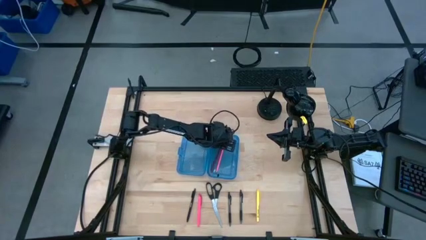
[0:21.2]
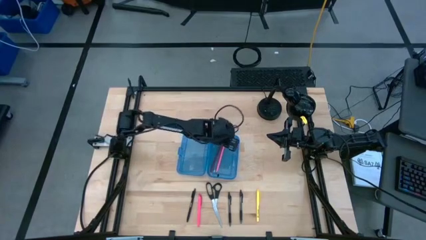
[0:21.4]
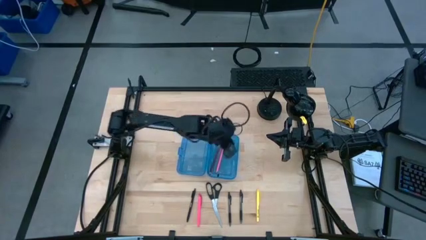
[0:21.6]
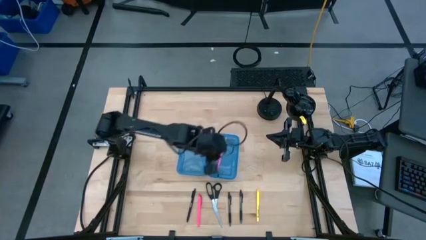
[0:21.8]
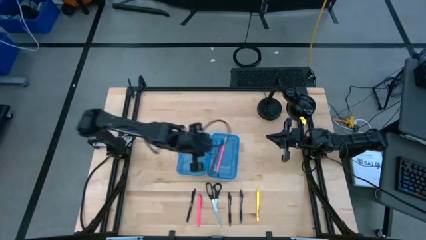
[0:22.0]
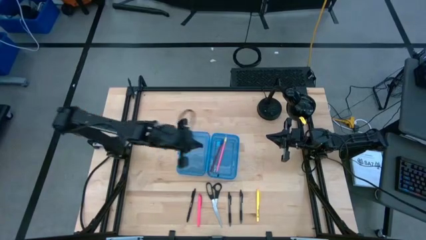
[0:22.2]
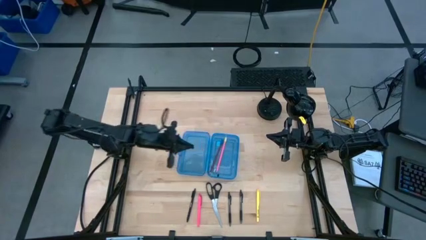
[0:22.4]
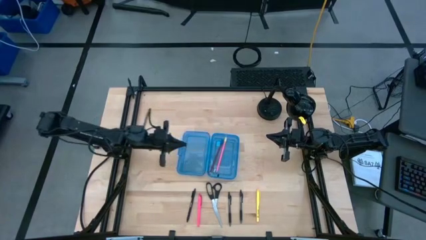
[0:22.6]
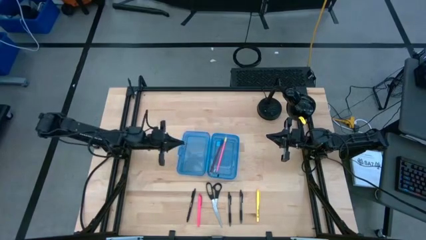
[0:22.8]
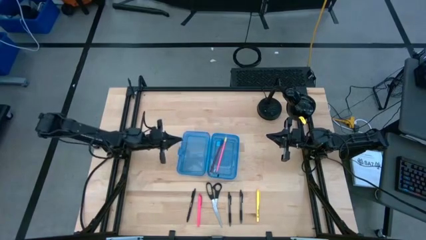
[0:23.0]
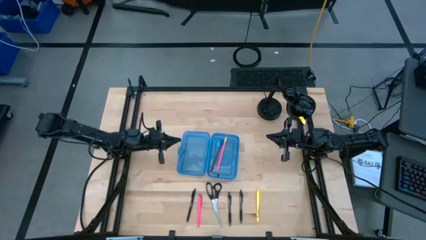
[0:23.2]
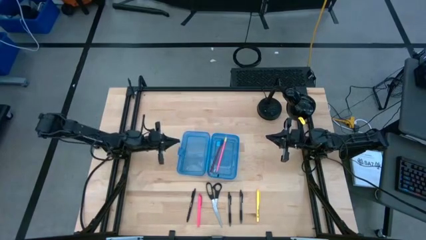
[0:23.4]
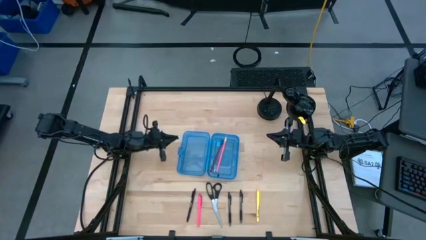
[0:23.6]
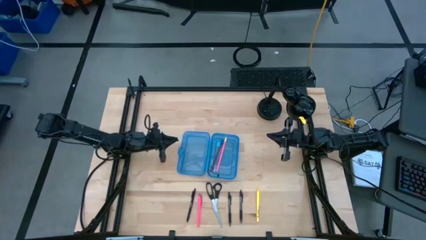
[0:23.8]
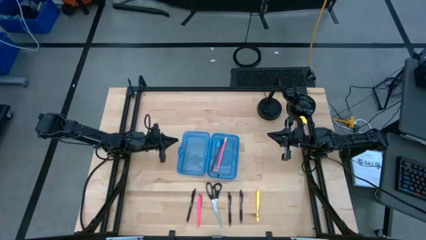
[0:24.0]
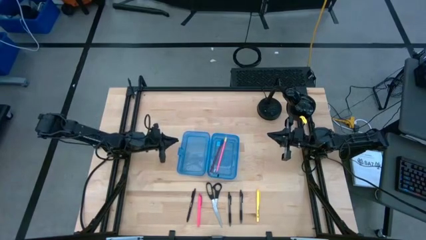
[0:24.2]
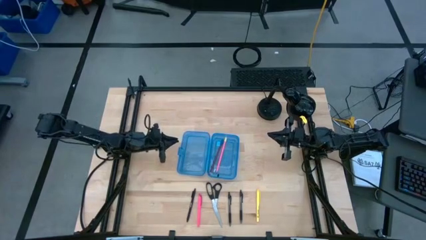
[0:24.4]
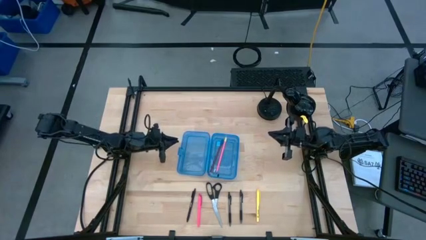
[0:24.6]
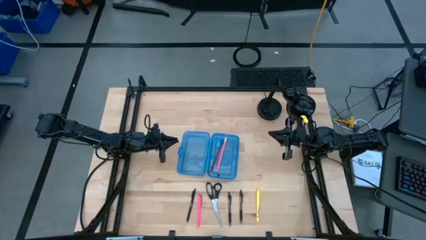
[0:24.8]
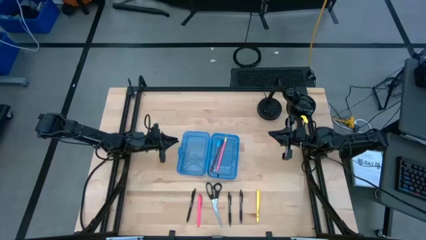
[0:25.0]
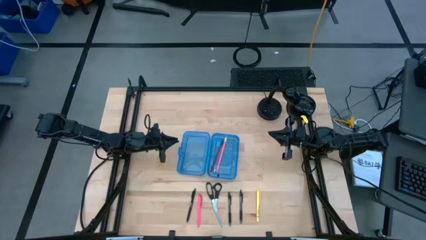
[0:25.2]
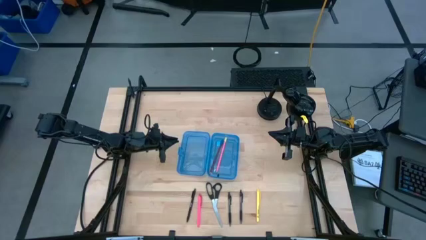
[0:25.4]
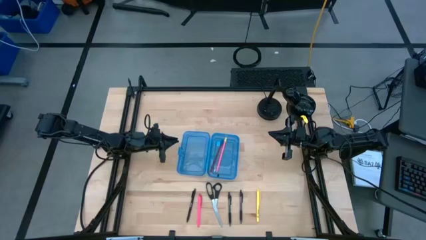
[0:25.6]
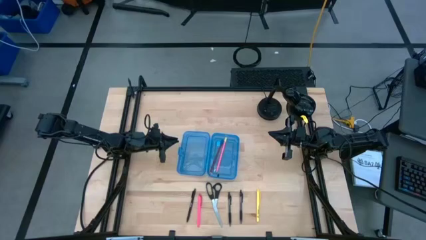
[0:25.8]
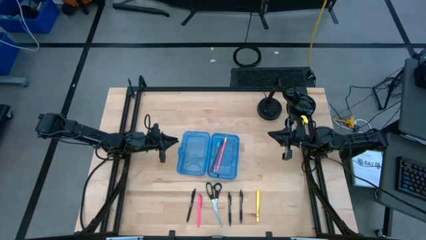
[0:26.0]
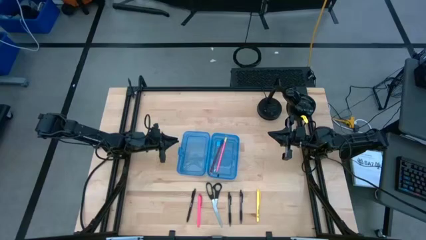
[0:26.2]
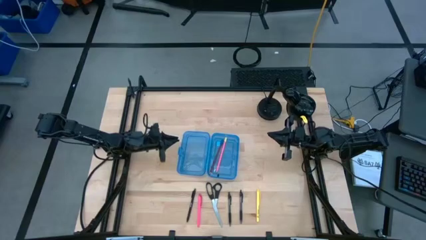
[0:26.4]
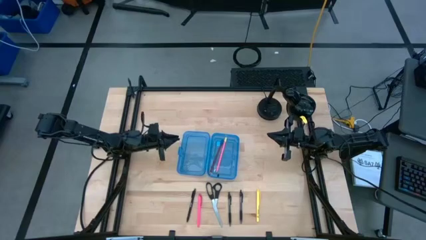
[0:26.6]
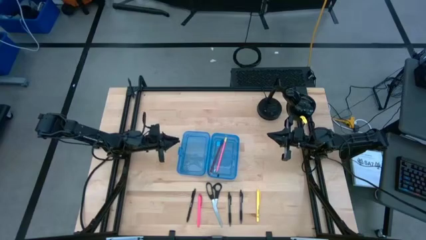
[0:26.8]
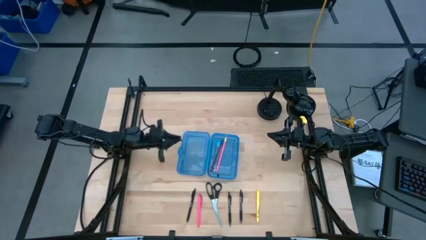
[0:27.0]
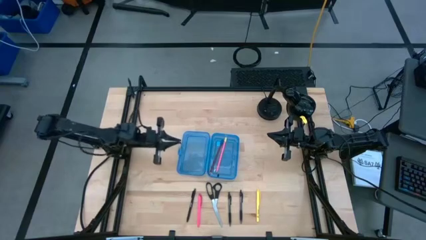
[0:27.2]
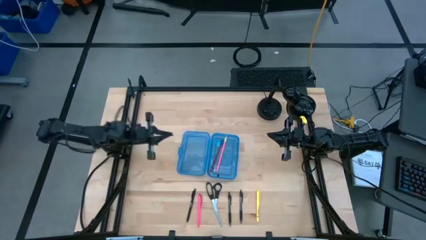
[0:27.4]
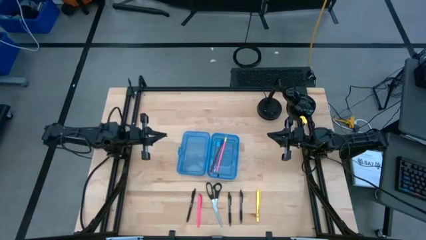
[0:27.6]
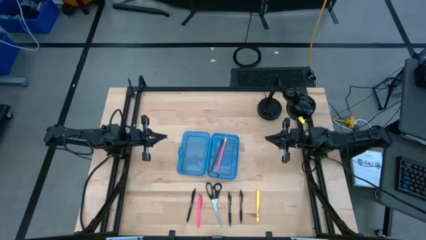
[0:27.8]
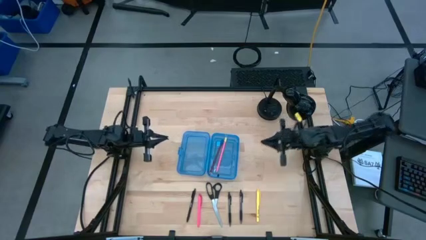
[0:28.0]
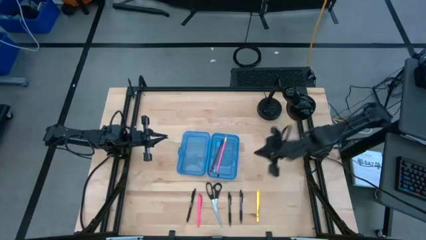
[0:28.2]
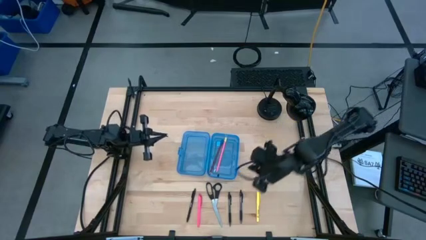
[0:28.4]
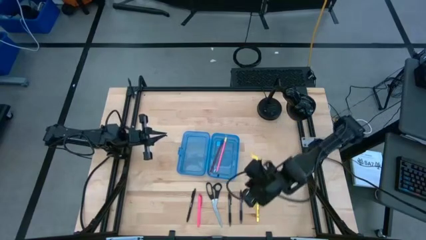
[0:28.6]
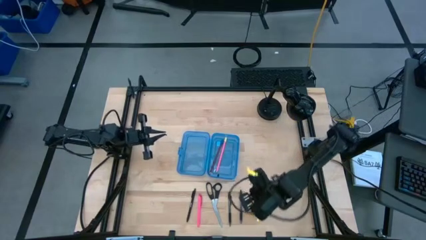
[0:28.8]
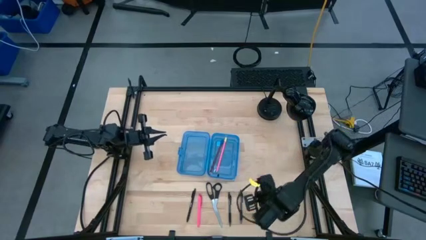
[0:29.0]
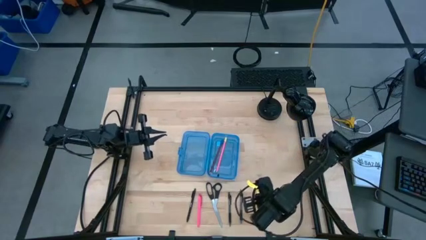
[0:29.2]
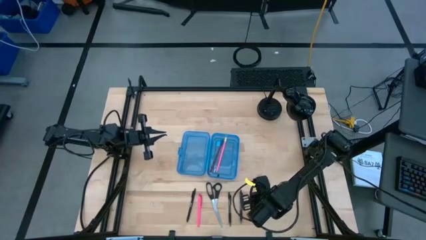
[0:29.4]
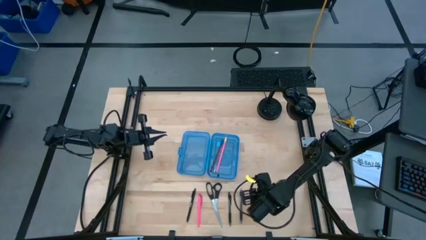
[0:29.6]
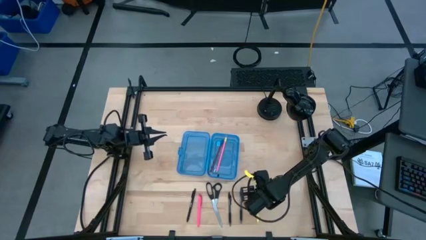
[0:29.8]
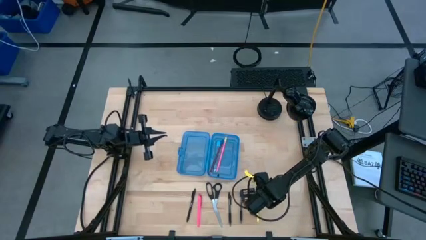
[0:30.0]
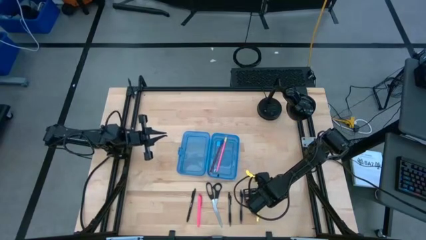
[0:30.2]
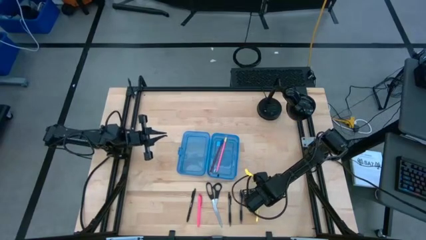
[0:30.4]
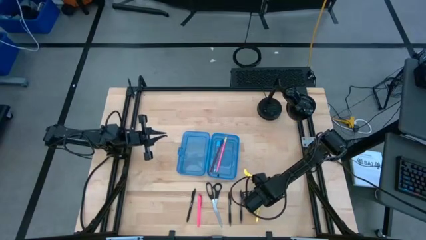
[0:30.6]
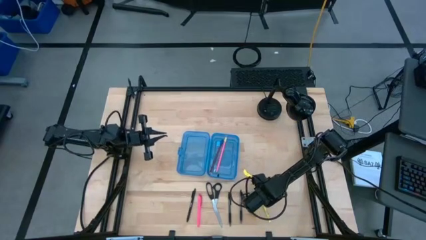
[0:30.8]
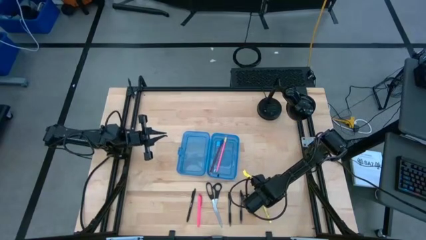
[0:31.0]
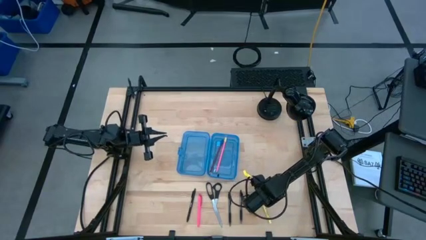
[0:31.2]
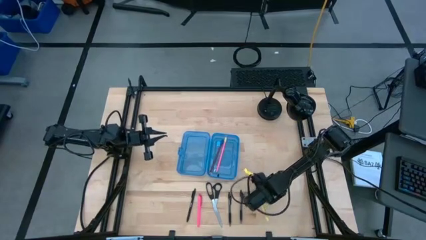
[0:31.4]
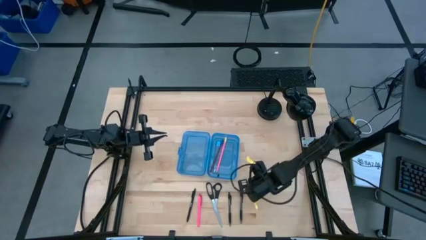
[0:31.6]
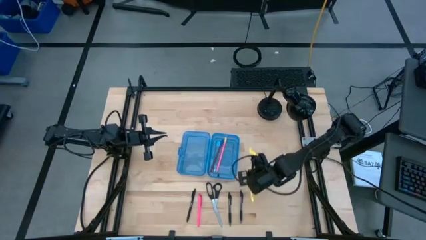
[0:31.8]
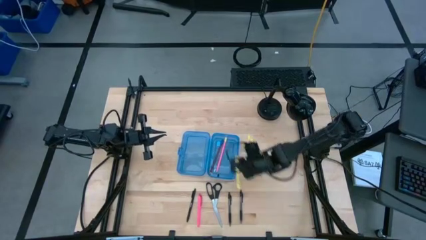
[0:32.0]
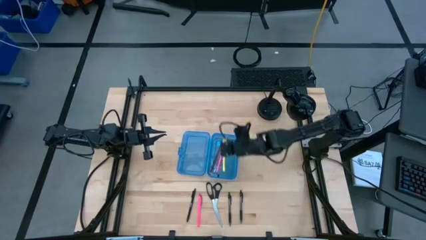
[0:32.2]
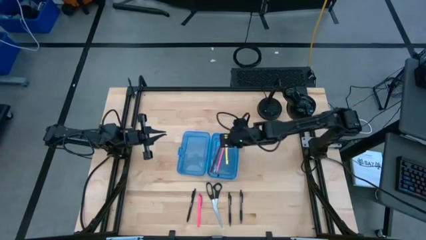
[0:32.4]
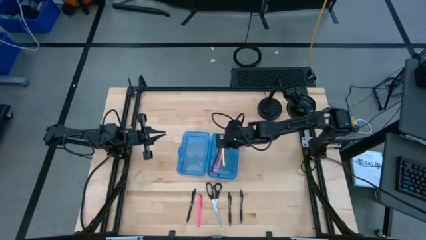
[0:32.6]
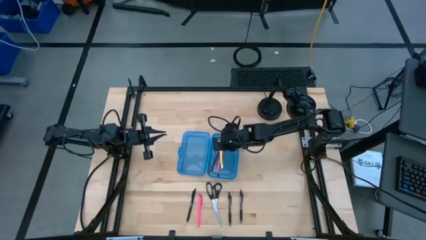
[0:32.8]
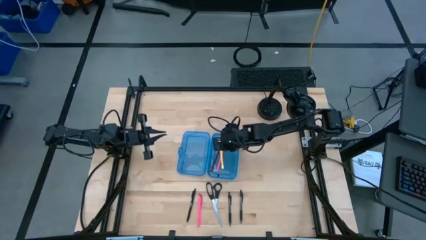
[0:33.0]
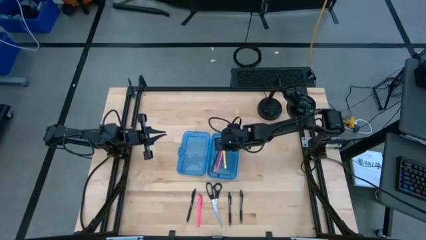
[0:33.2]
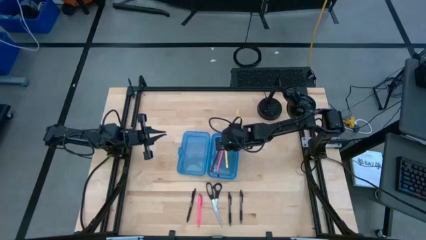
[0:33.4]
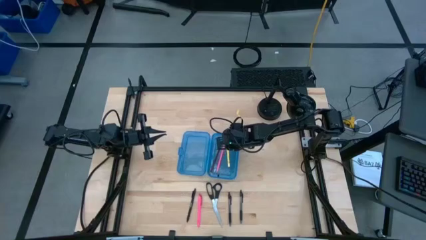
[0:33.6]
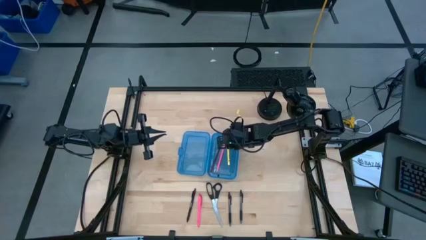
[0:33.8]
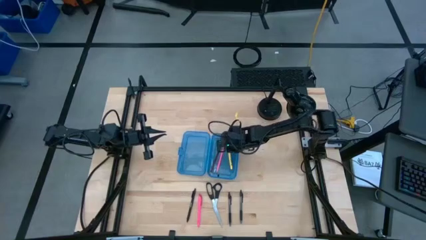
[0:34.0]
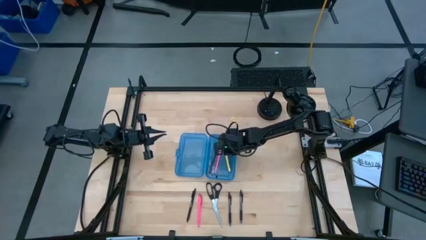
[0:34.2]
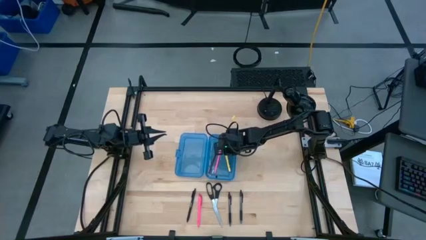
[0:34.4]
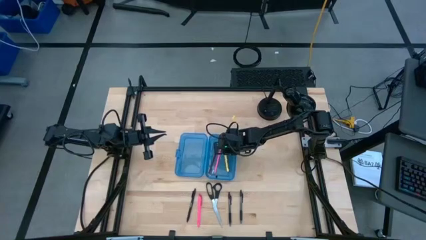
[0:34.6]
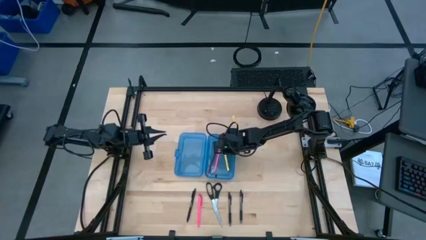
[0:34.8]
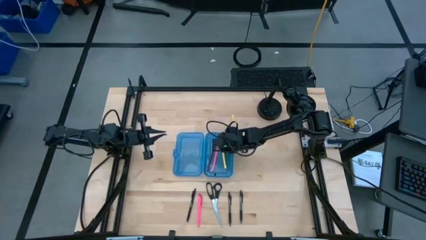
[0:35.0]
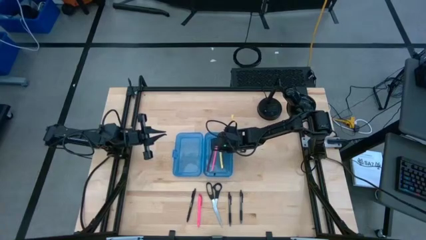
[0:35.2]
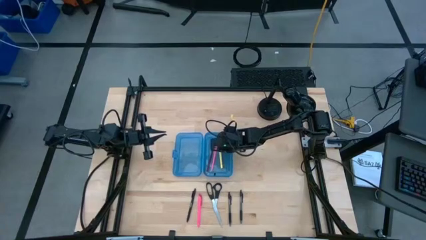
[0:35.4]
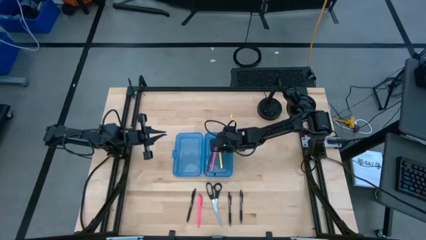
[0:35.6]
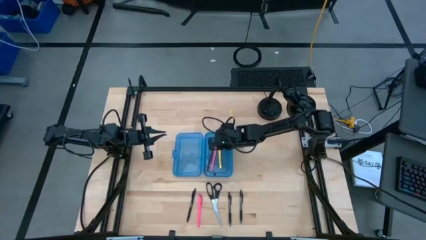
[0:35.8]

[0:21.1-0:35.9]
Task: Pick & place school supplies into a supply box
Put the yellow pen into the blue pencil box

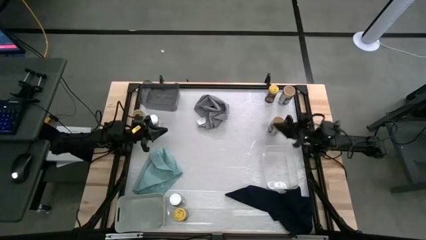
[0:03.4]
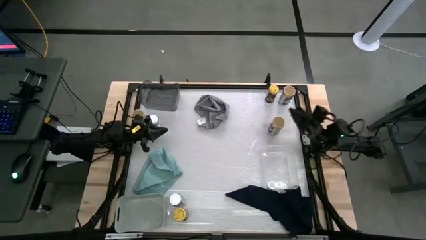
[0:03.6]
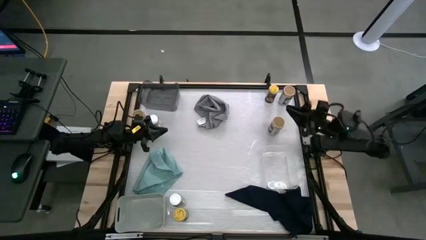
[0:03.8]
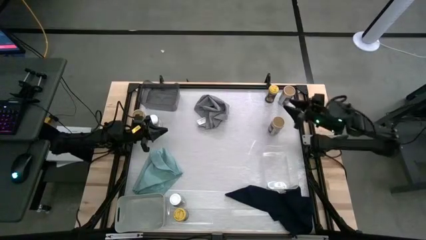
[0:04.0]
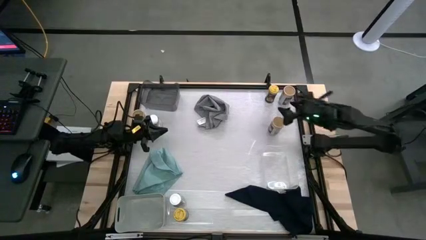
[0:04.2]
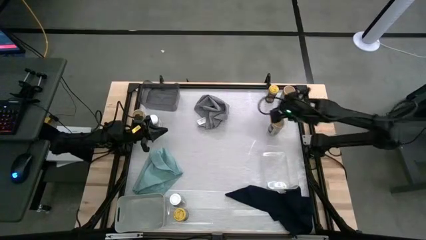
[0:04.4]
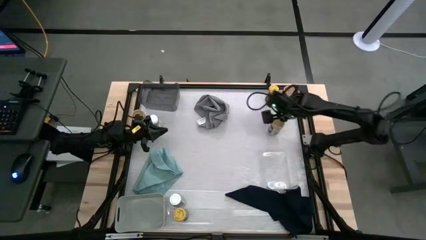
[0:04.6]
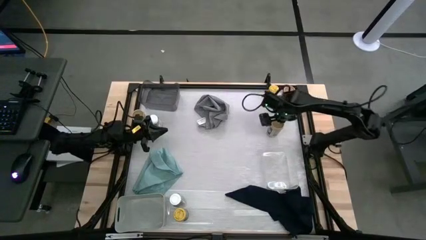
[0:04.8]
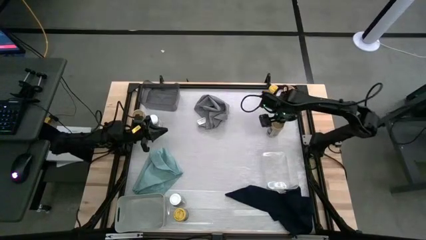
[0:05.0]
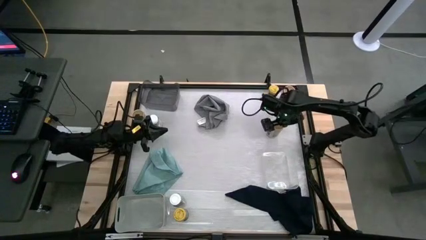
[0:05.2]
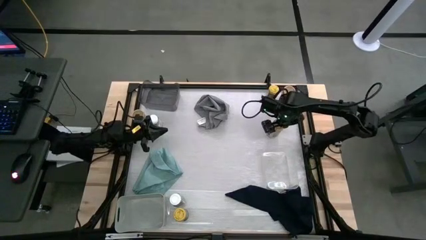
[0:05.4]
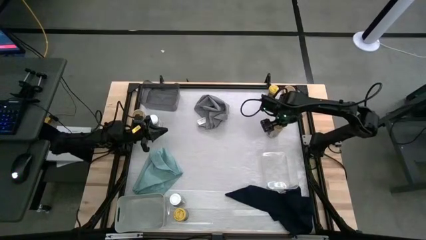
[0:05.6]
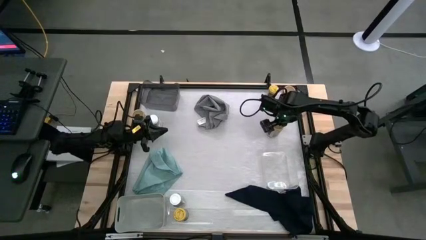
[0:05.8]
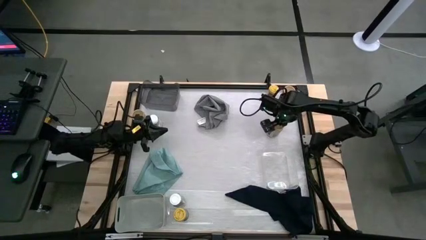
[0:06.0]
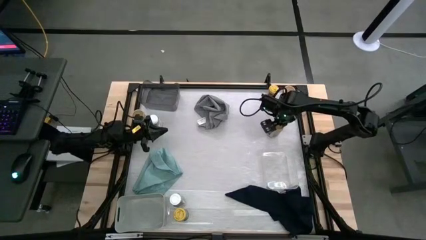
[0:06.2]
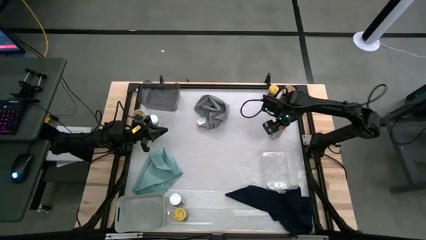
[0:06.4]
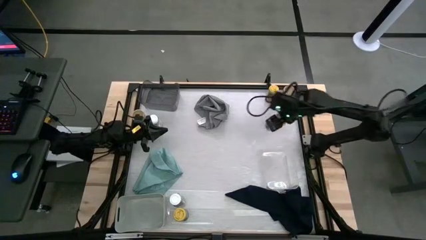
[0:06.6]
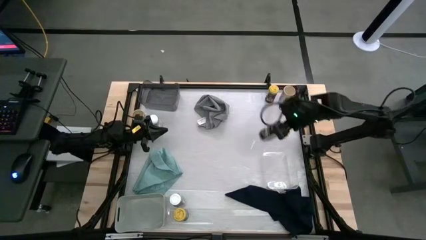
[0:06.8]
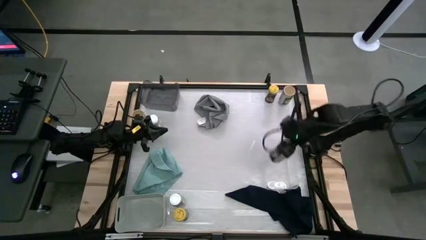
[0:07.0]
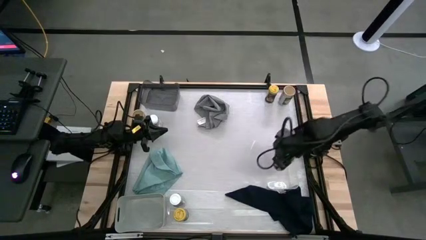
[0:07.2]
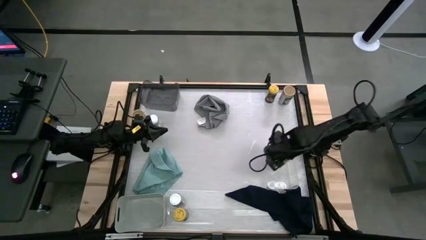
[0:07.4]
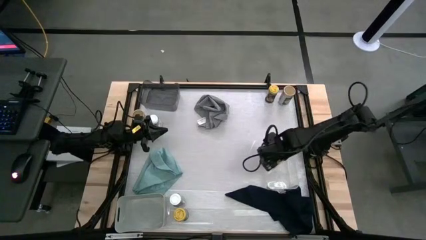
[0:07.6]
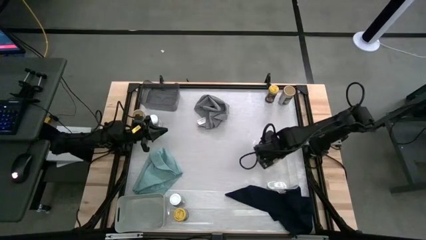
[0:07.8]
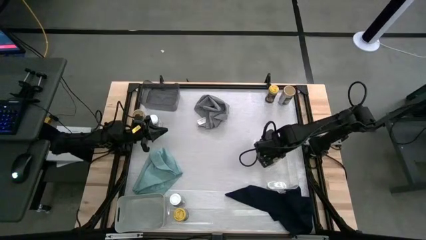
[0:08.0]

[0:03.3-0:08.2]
Task: Sort spices by type
Put the bottom right brown seasoning bottle into the transparent bin
